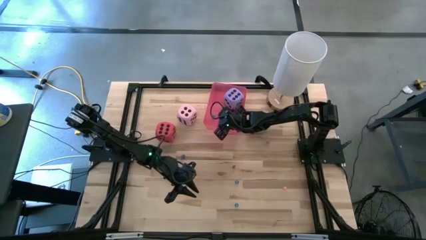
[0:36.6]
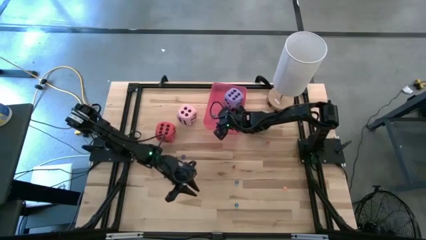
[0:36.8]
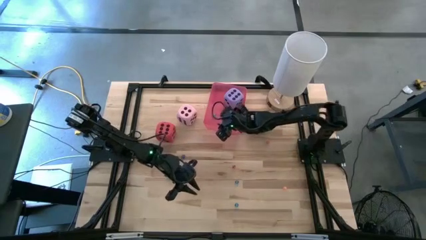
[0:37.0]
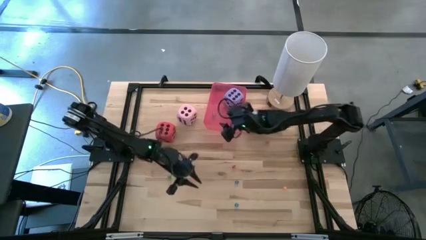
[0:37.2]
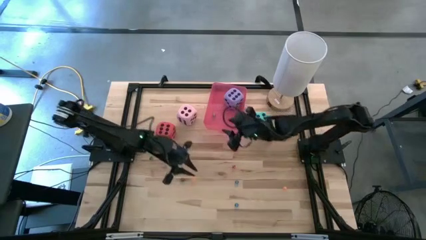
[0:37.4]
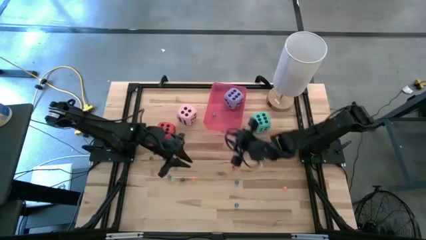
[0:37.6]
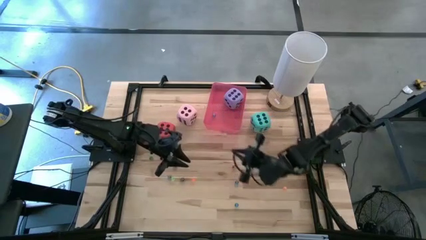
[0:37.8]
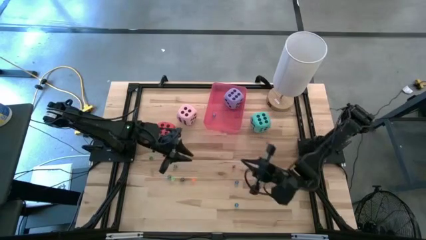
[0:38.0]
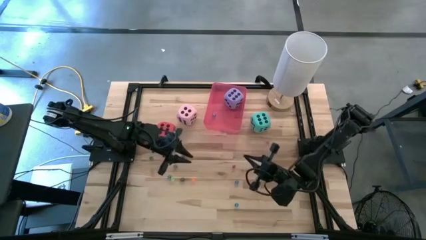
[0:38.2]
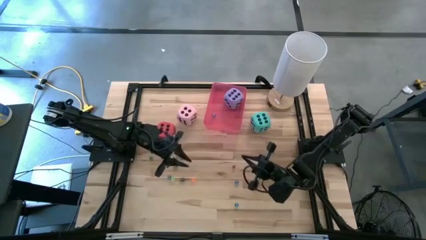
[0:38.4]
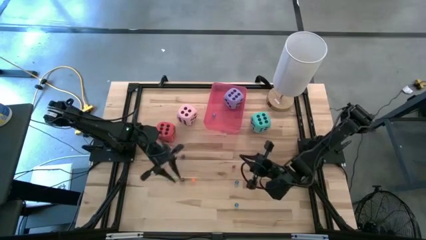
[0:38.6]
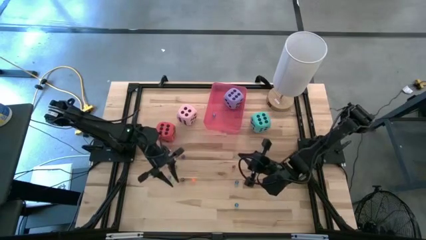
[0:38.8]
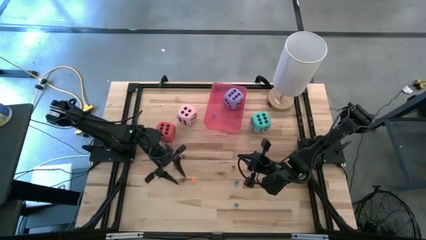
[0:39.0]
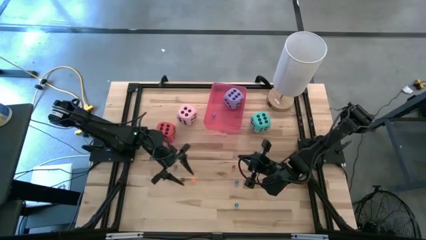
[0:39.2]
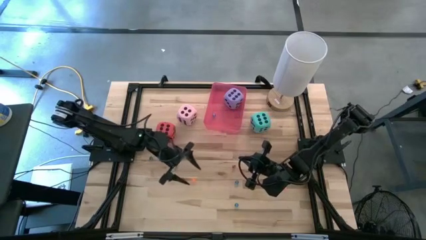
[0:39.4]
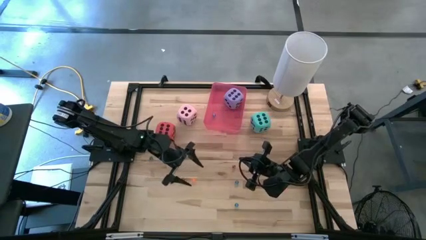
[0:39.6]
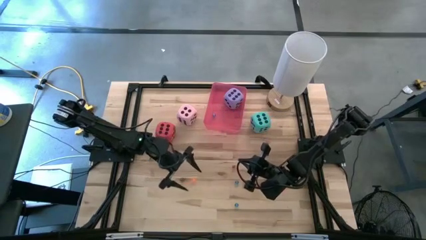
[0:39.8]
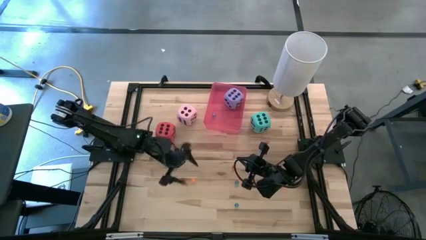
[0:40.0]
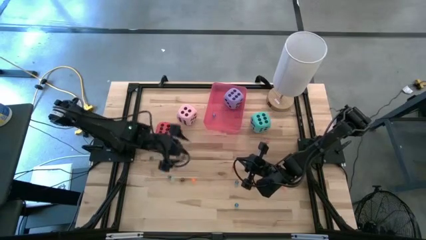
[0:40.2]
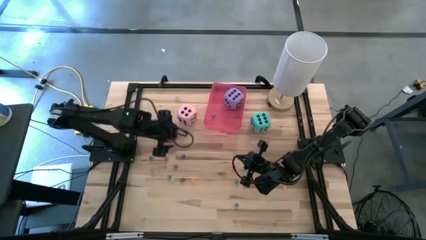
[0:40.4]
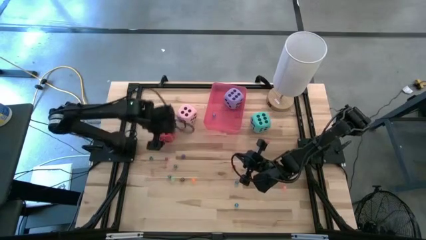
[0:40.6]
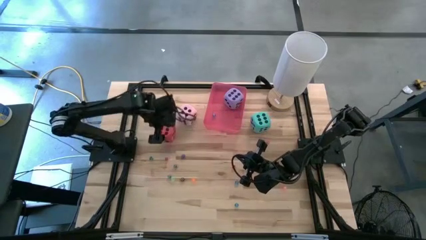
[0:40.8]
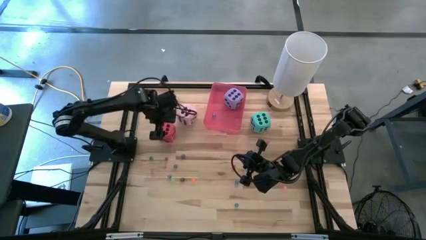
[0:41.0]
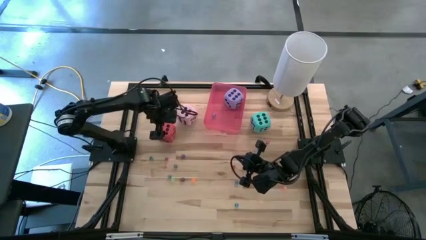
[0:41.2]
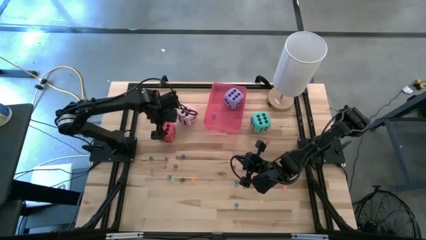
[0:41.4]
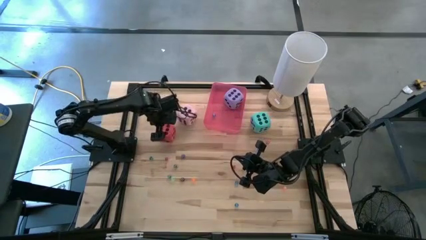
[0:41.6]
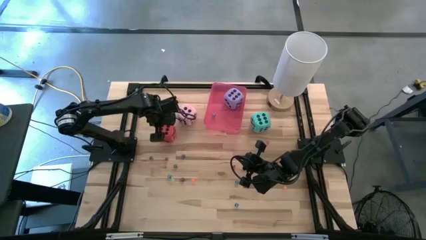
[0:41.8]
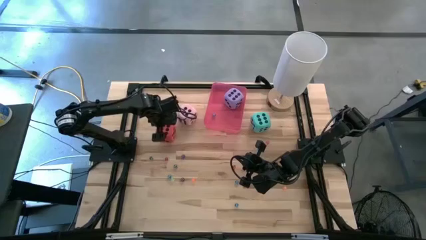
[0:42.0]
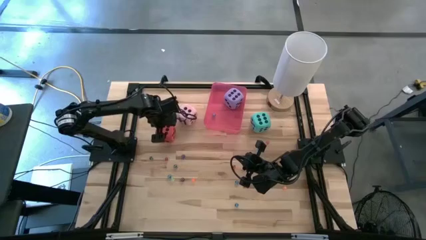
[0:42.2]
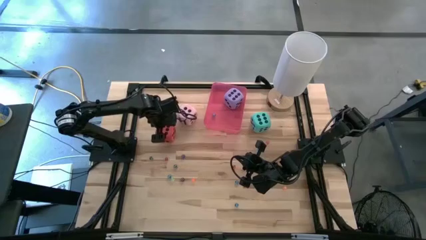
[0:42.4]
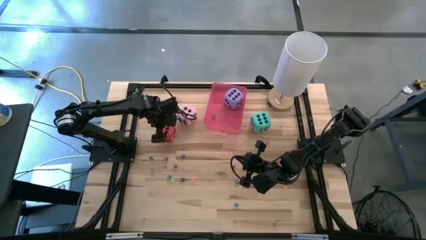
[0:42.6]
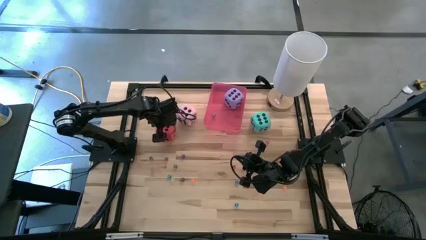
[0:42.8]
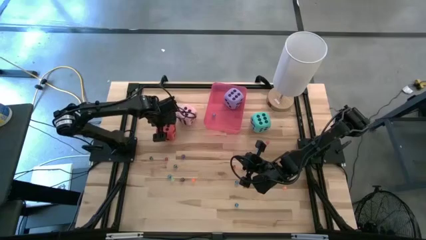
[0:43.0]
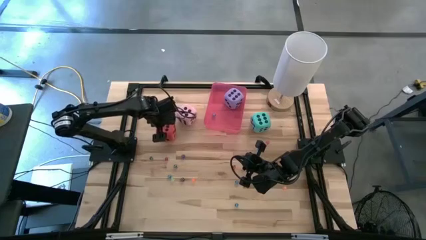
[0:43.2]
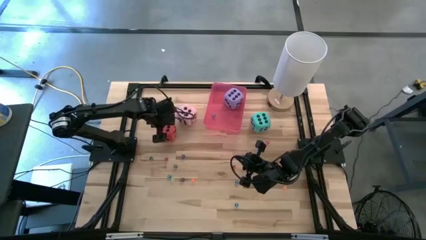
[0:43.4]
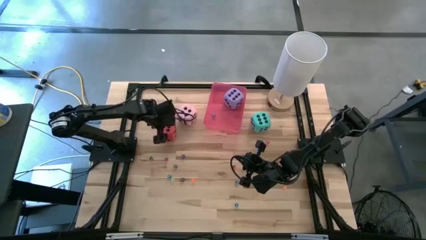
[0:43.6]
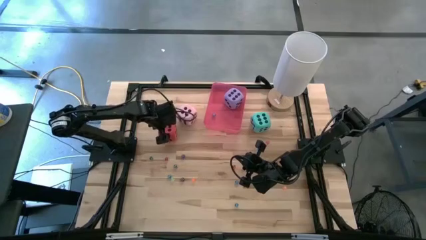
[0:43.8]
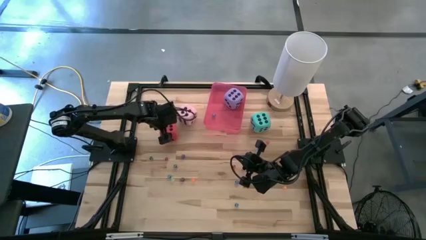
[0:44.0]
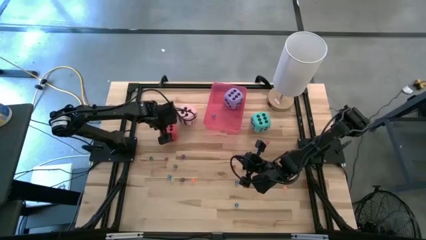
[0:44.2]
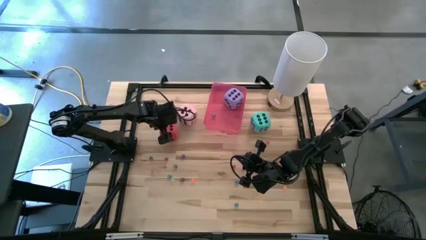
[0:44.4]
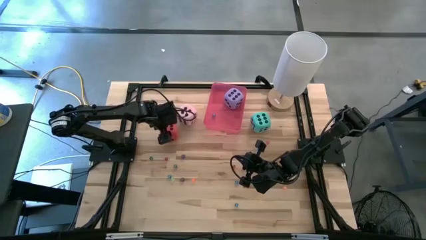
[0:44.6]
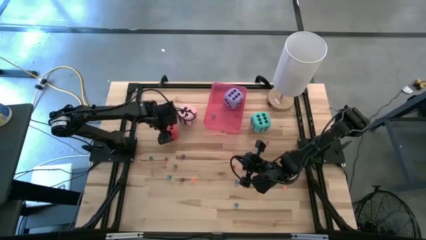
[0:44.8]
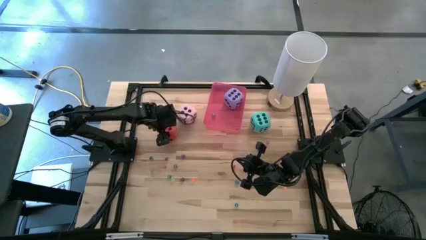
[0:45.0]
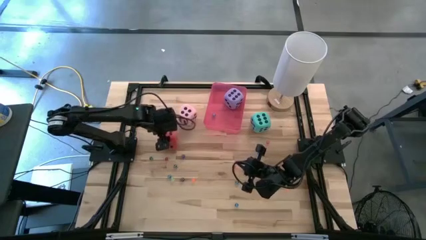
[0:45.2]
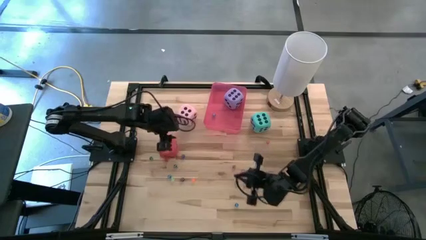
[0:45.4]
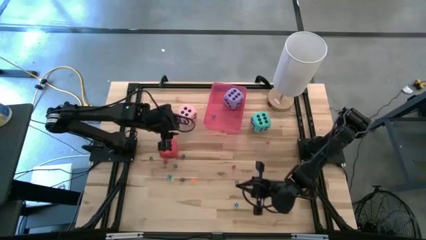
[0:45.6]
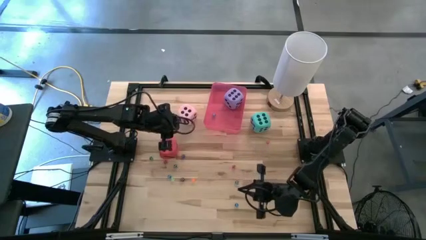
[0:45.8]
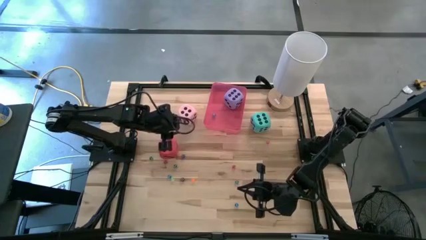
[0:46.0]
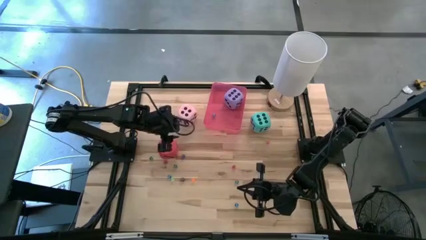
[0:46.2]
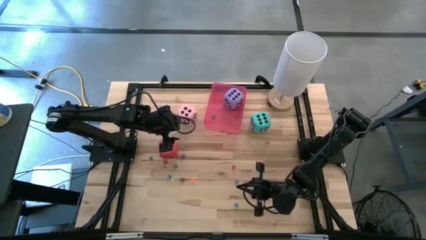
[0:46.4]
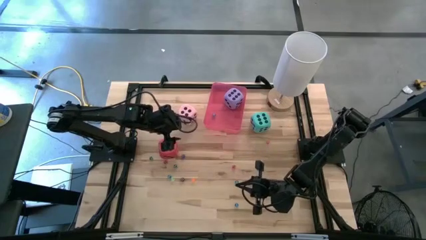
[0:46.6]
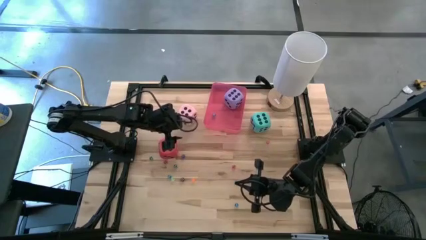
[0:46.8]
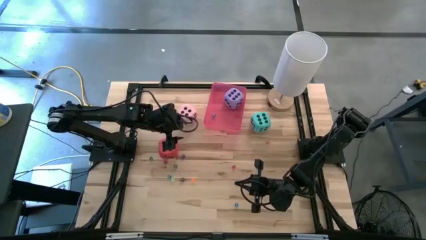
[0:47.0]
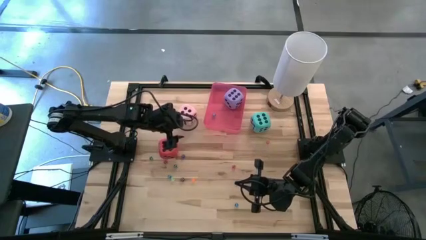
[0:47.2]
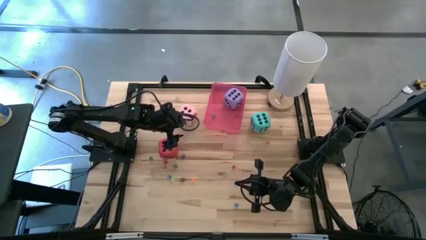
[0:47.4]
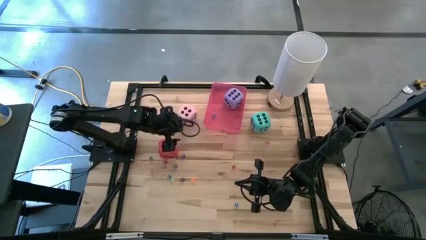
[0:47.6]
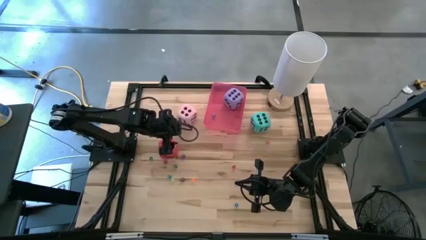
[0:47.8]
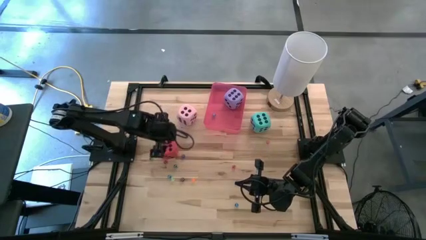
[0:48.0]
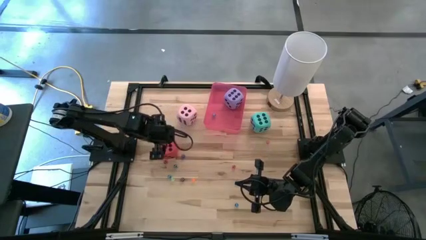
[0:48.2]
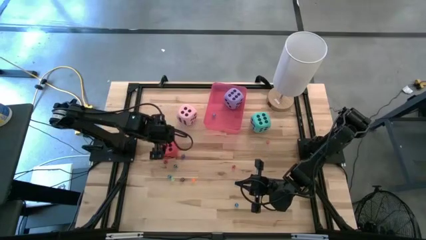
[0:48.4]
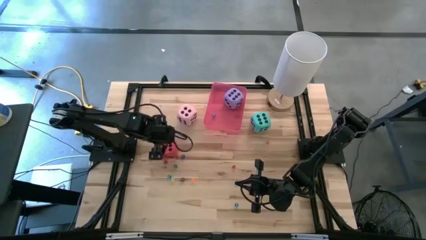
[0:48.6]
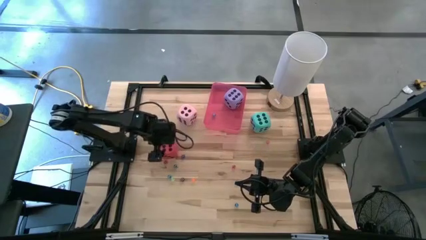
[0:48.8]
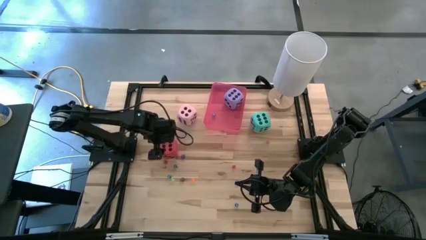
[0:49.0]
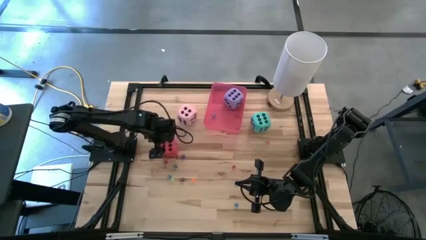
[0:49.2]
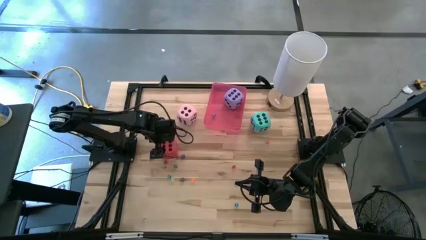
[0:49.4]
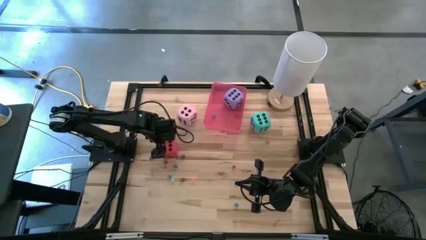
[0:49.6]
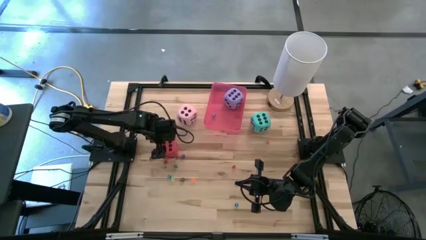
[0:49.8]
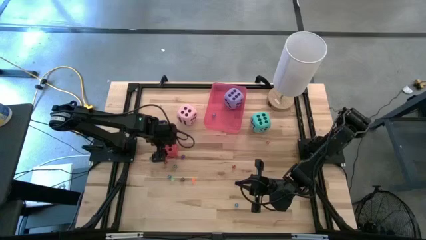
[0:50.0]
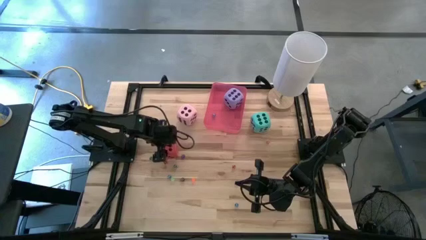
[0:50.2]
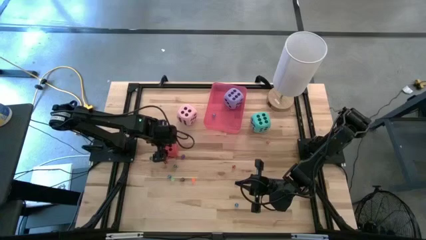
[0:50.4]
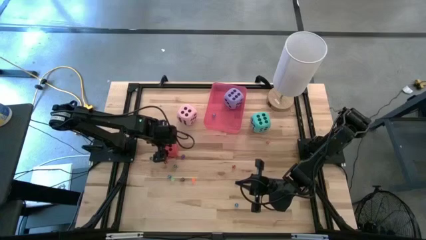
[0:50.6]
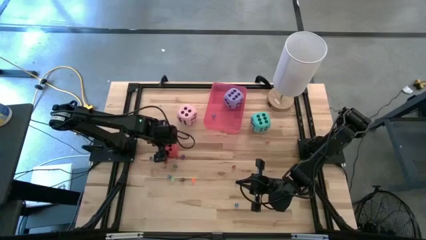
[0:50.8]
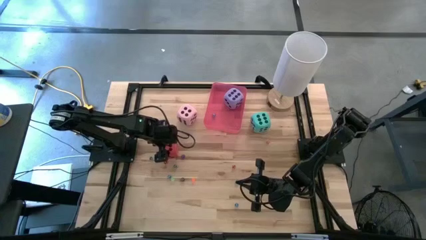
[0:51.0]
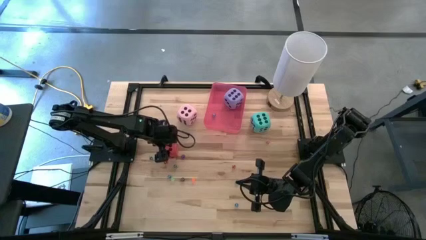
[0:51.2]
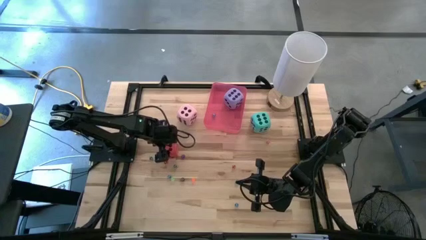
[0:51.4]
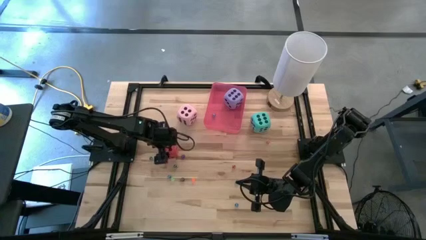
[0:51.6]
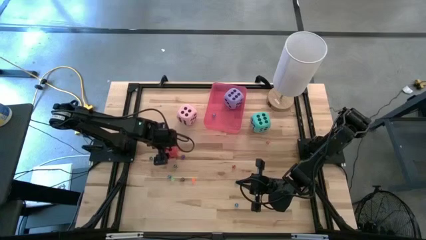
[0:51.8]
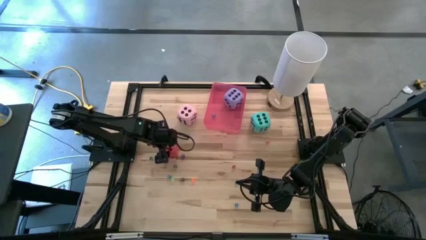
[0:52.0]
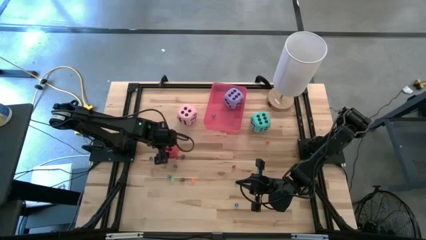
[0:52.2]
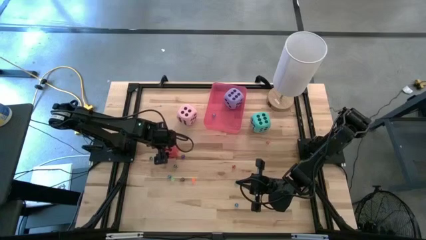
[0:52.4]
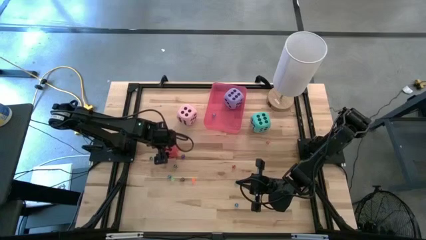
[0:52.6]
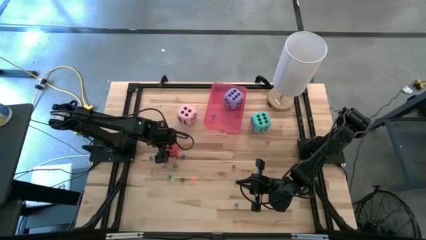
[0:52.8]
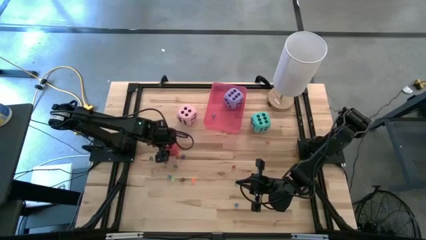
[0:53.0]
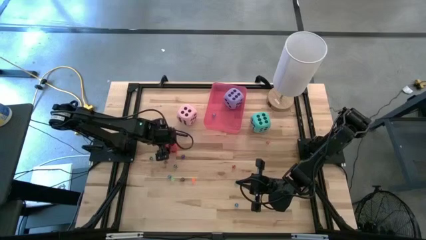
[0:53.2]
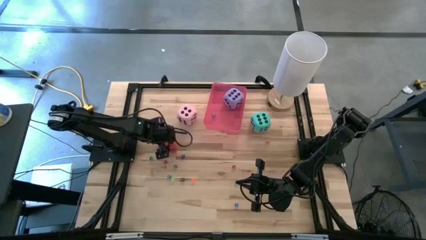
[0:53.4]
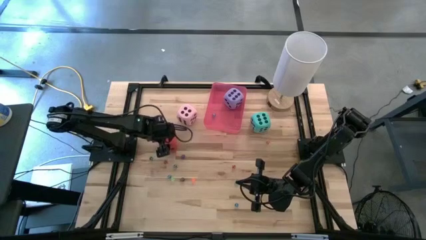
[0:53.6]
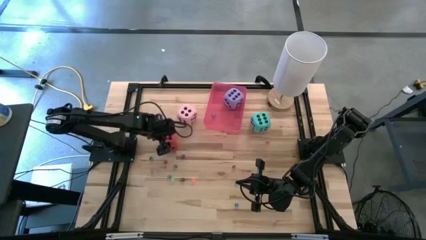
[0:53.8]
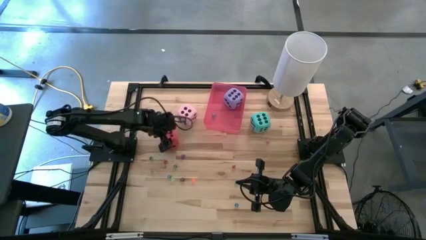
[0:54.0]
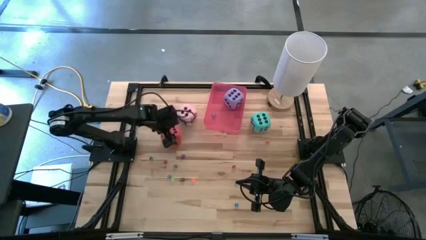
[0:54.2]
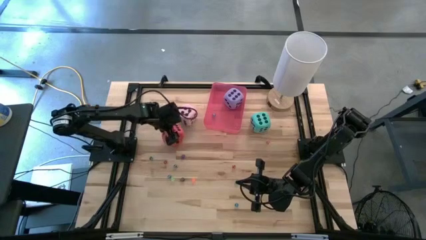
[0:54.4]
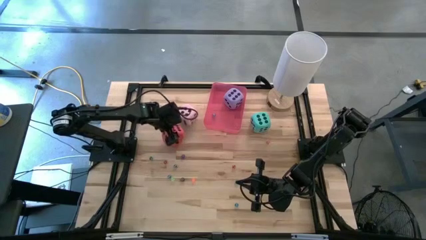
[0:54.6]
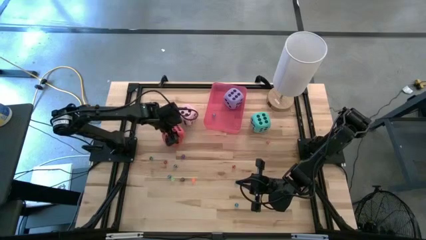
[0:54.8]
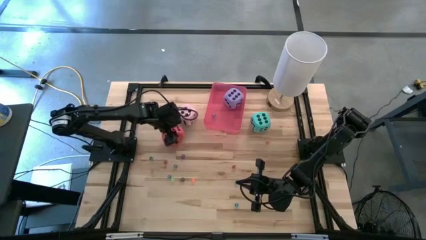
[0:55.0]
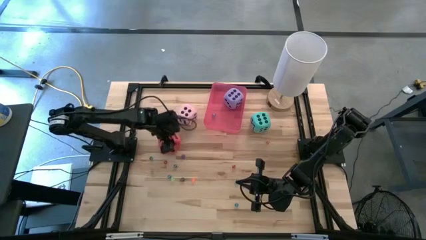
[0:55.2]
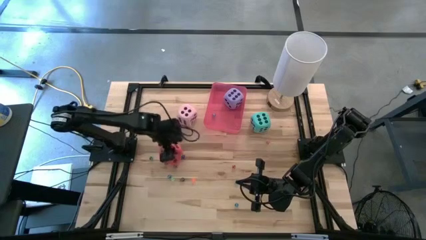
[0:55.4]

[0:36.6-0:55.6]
Task: Pick & Place Dice
Put the large red dice into the bin
